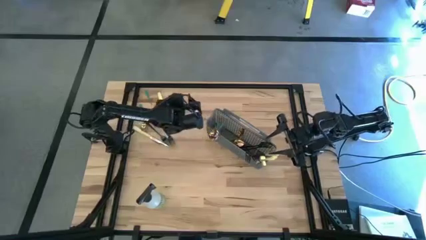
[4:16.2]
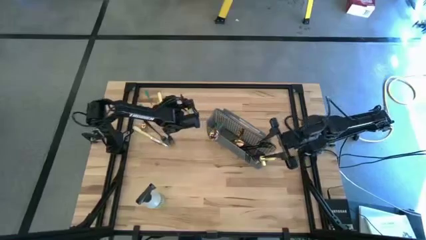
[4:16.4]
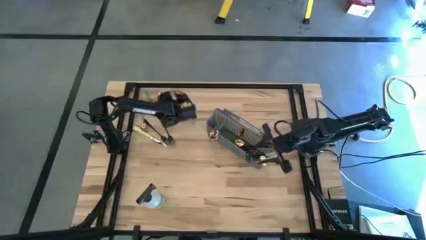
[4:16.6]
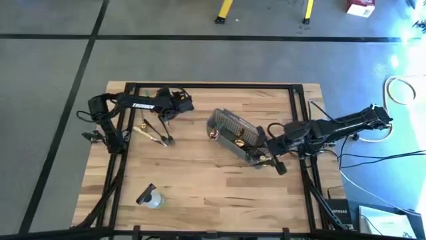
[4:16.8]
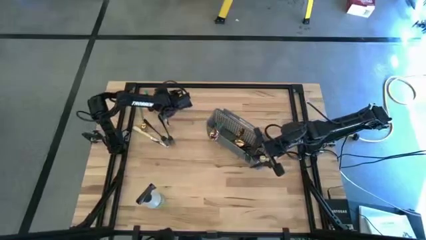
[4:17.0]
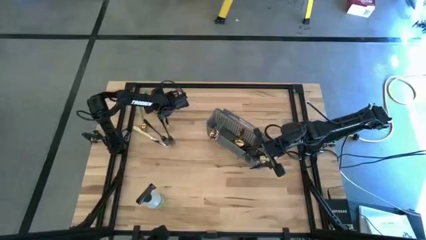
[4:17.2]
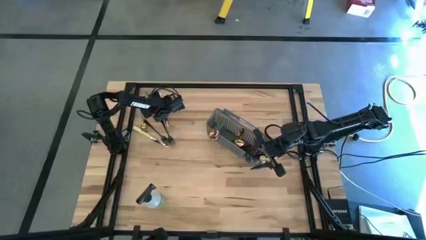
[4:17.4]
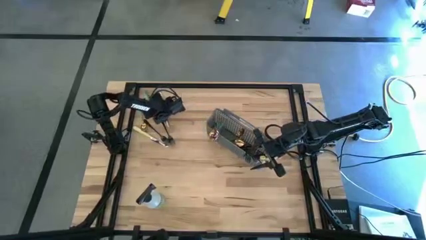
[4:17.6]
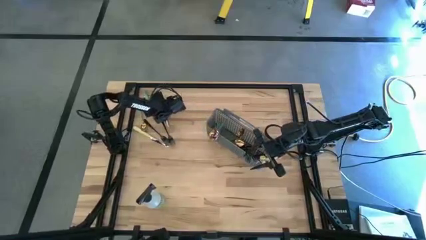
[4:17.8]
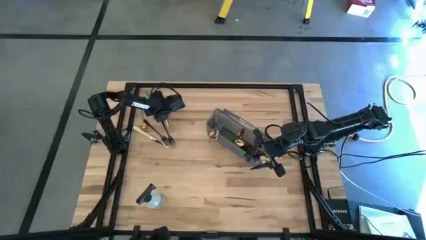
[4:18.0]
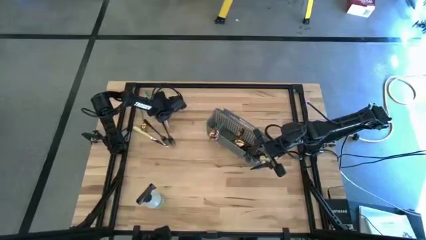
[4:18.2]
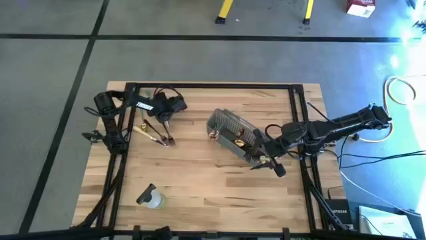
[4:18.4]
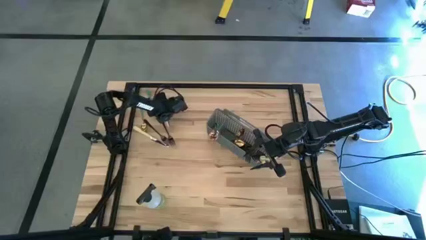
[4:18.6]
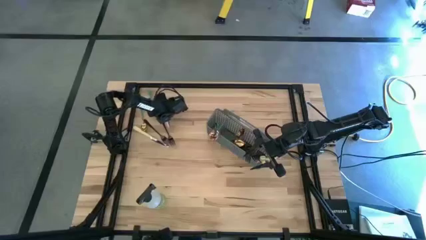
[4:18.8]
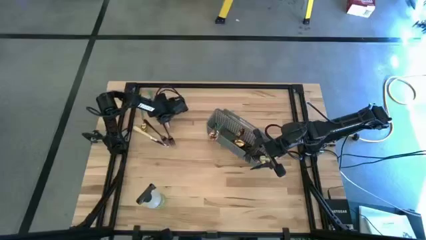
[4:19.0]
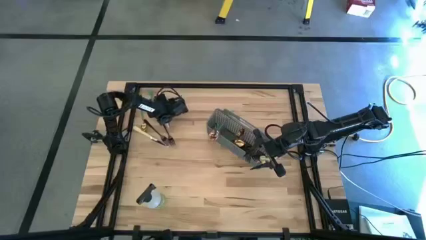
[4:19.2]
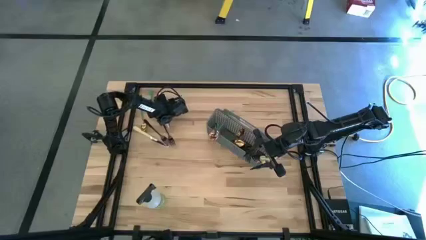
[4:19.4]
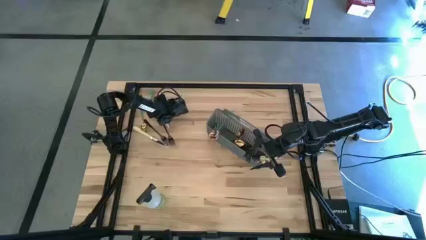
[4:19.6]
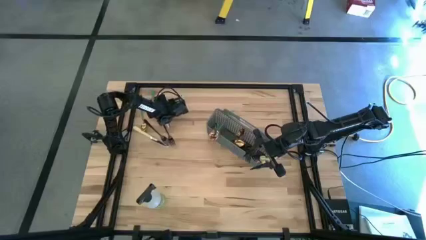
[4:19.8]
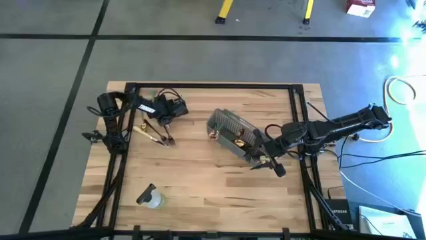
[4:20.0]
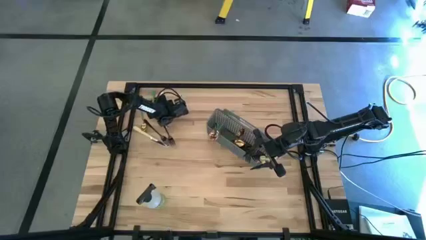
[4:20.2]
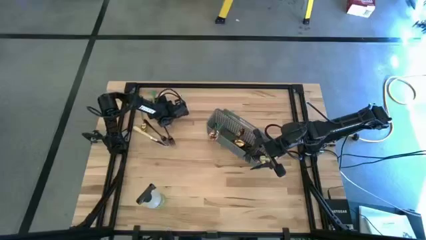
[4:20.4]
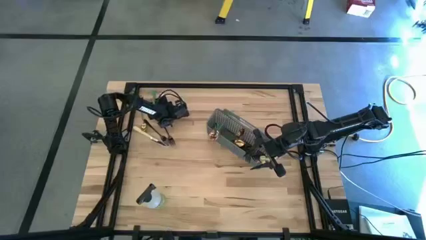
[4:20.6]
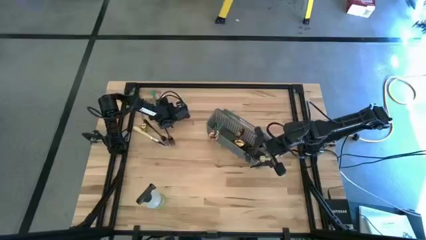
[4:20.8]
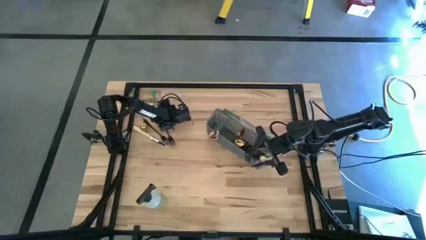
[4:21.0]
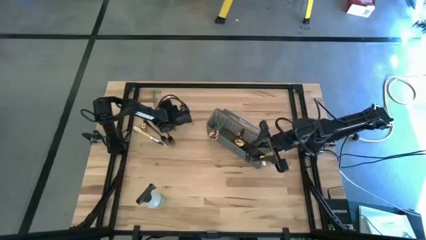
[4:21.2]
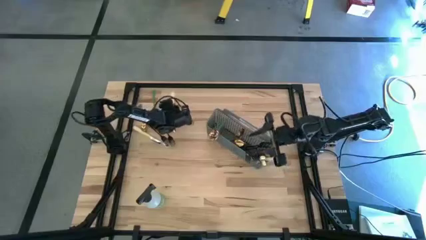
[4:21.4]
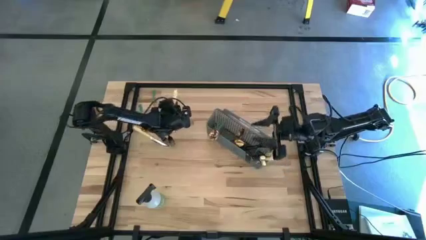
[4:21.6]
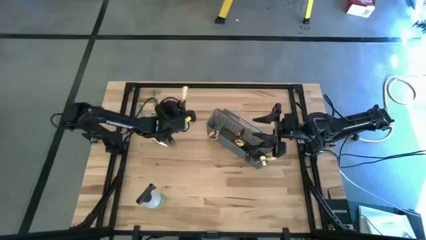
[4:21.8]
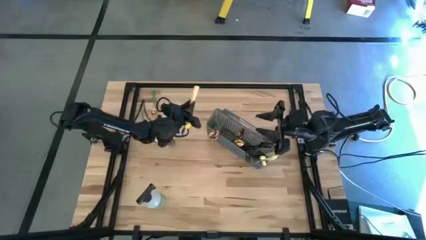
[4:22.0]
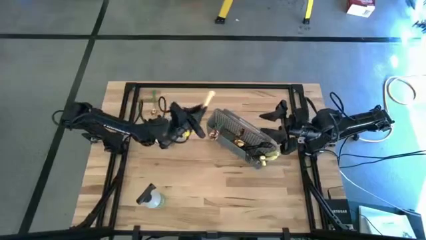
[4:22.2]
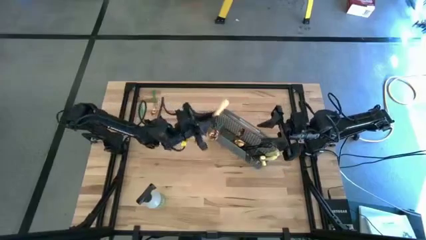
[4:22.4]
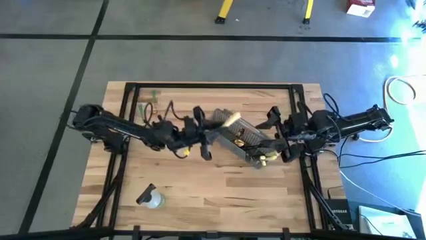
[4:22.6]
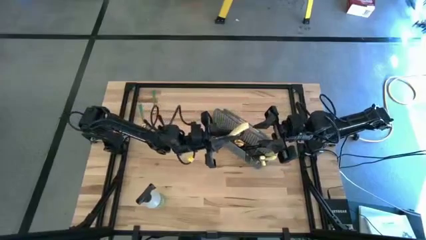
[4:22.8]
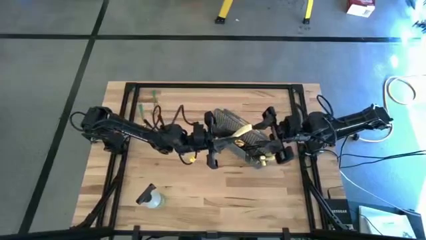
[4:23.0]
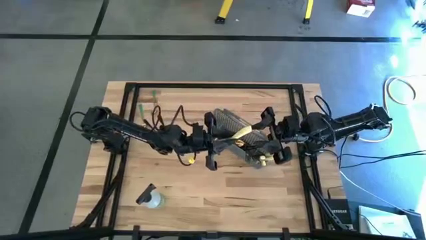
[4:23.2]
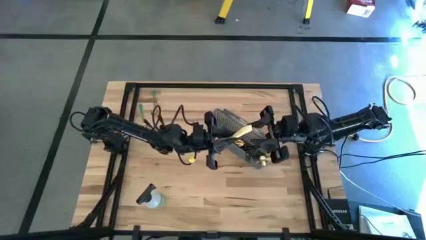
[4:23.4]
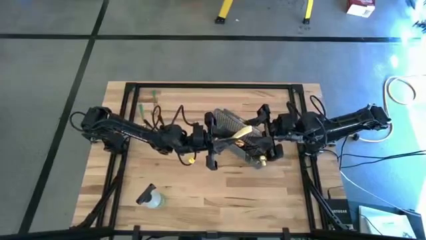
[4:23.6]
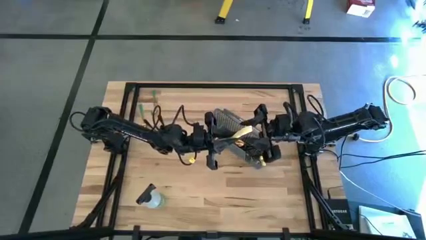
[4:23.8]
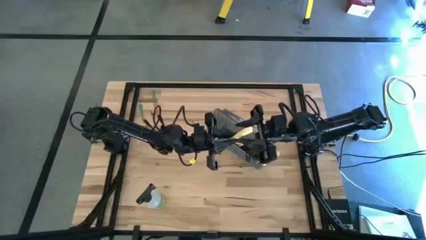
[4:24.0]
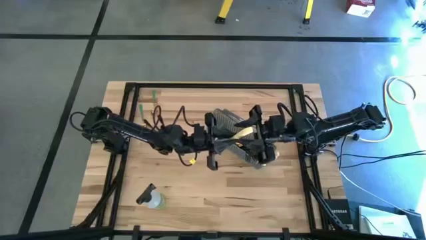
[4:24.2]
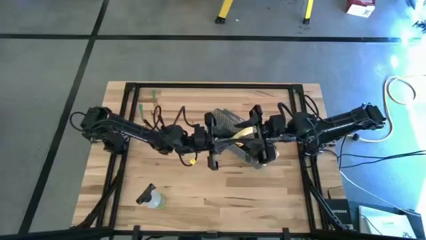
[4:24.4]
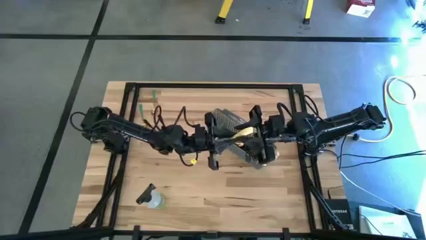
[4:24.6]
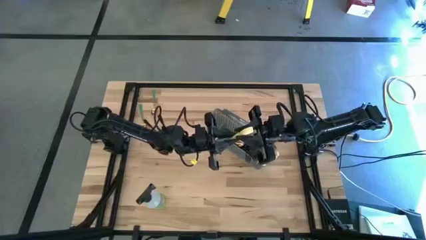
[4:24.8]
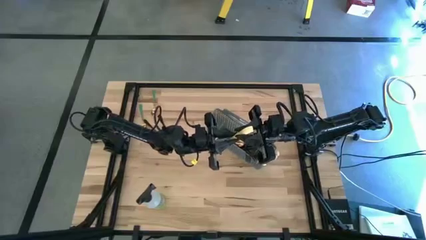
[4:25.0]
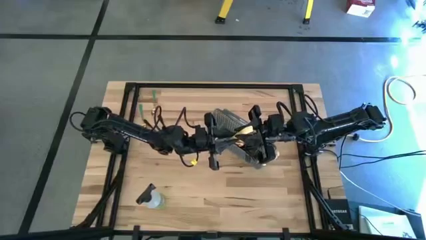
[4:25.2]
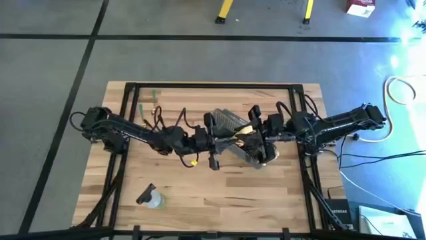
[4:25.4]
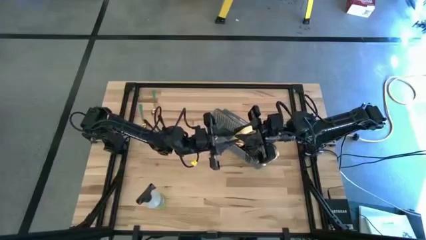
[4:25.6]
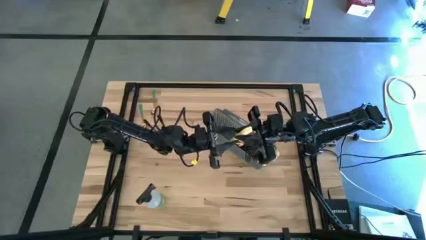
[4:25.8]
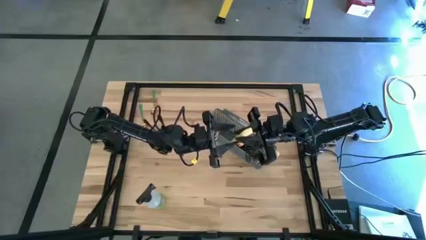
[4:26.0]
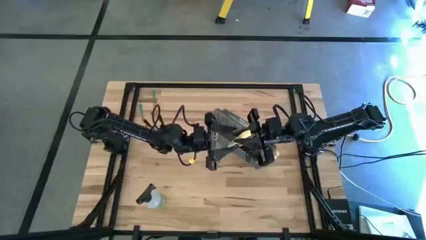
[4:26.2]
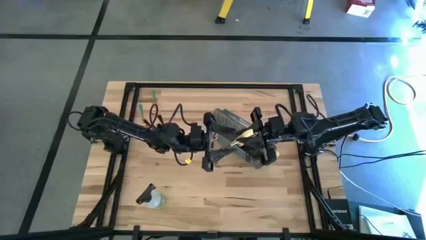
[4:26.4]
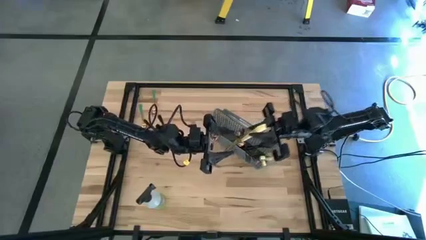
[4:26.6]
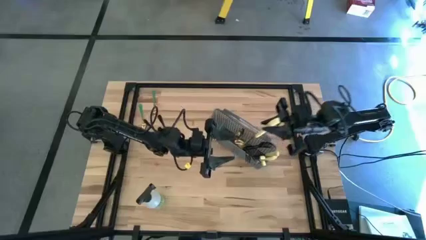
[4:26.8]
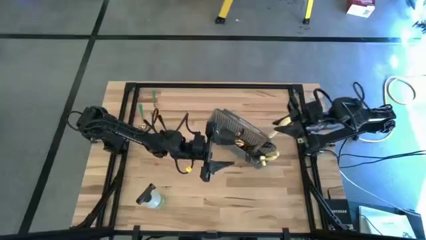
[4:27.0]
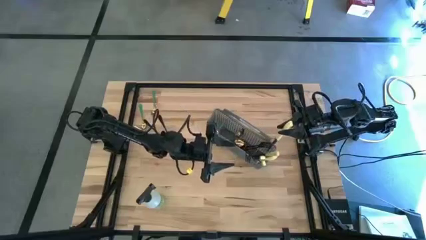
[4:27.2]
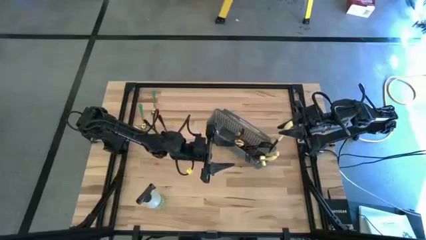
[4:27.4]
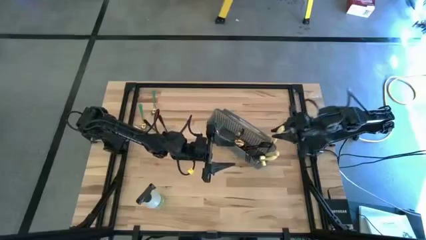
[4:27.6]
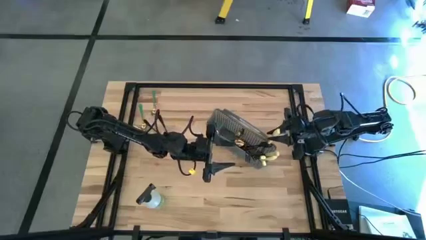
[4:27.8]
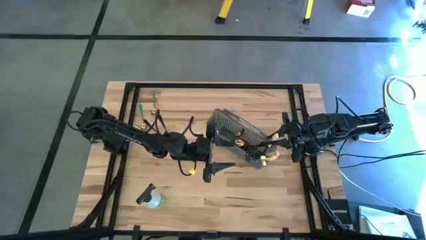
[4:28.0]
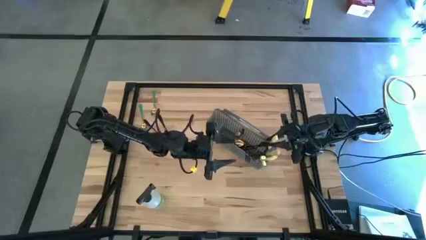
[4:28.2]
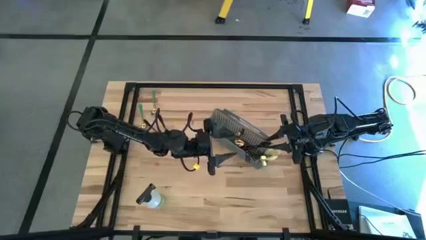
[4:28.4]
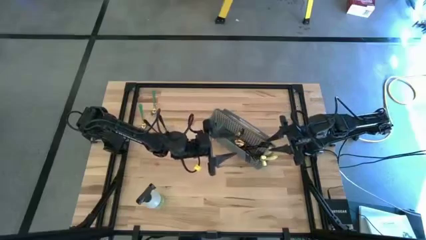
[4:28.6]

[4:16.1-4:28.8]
Task: Sort silverware
Put the silver knife into the cutlery rack

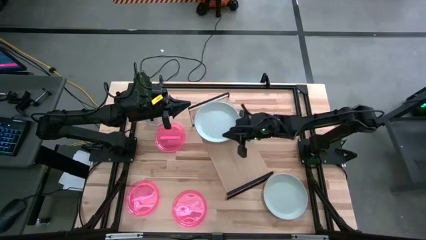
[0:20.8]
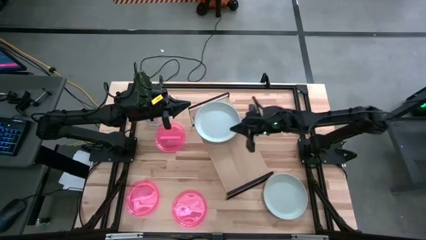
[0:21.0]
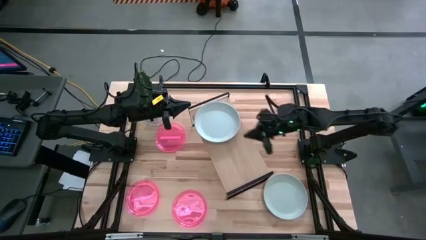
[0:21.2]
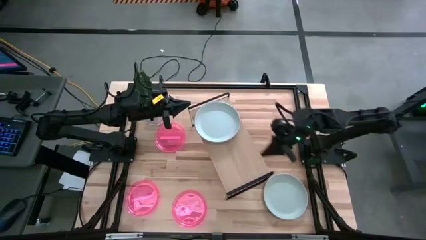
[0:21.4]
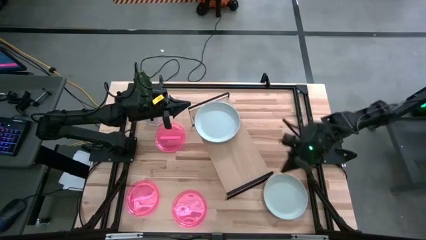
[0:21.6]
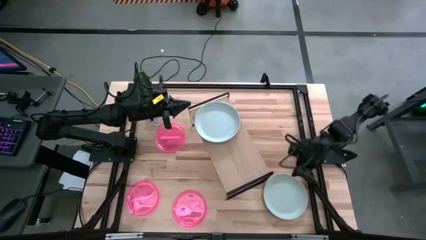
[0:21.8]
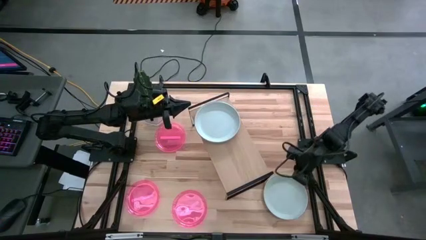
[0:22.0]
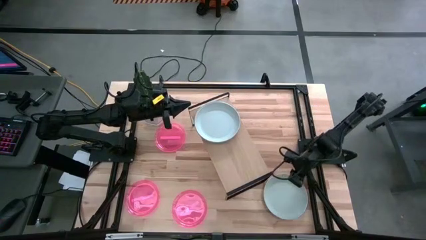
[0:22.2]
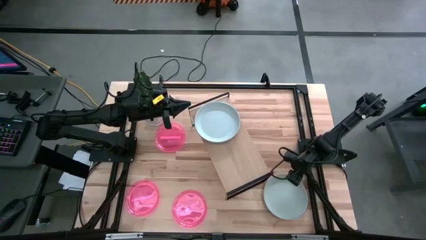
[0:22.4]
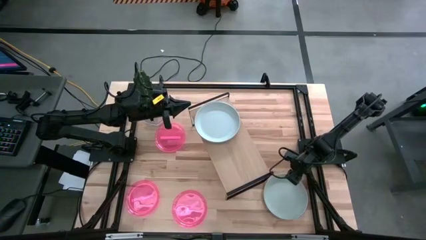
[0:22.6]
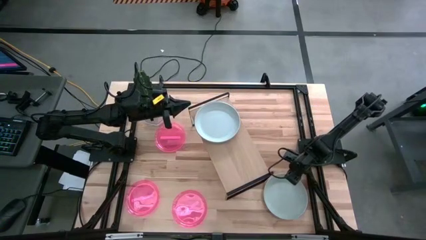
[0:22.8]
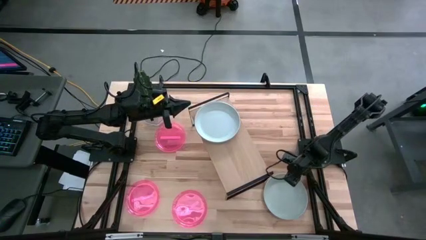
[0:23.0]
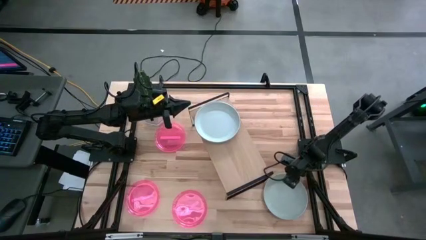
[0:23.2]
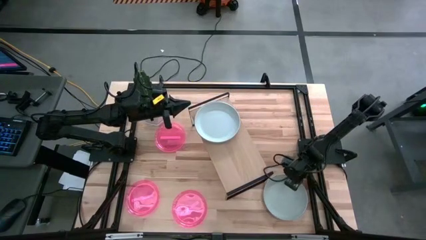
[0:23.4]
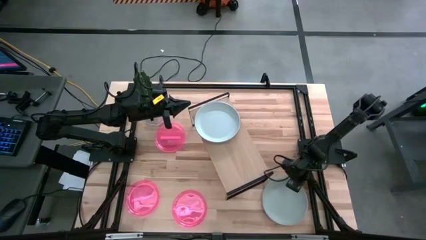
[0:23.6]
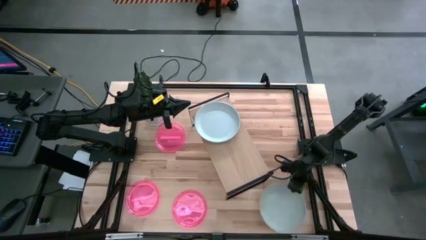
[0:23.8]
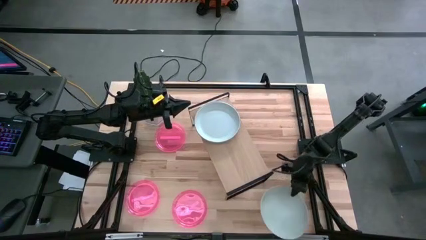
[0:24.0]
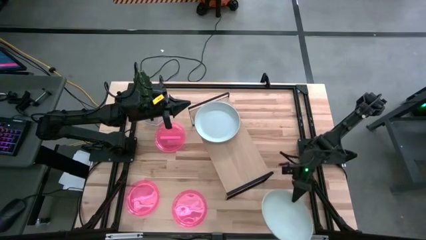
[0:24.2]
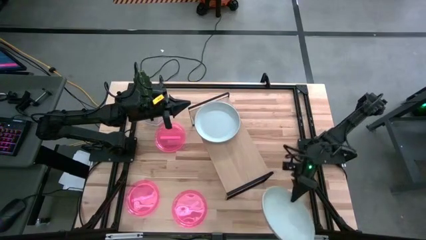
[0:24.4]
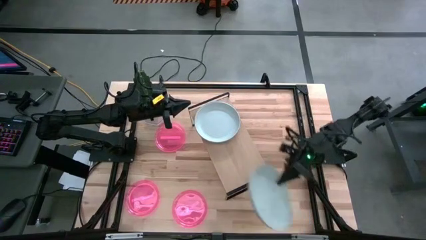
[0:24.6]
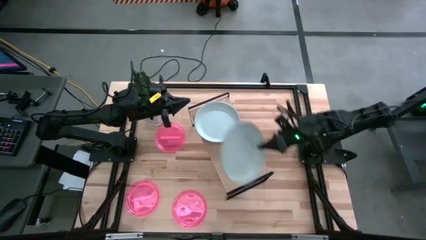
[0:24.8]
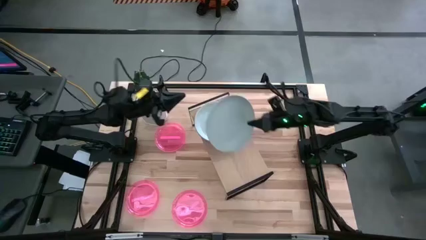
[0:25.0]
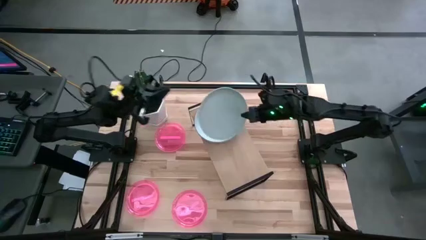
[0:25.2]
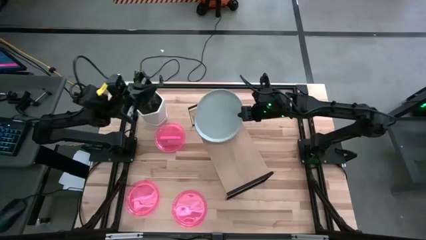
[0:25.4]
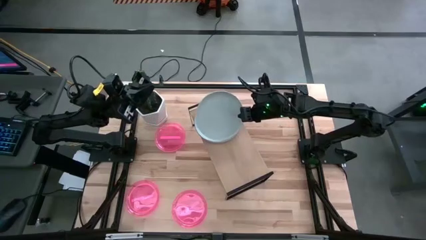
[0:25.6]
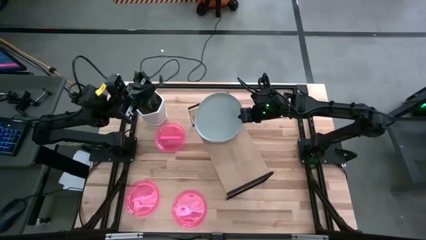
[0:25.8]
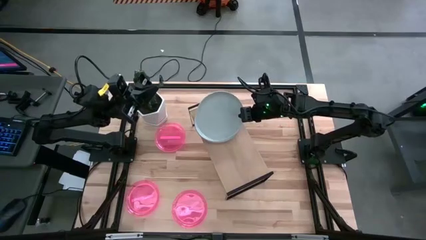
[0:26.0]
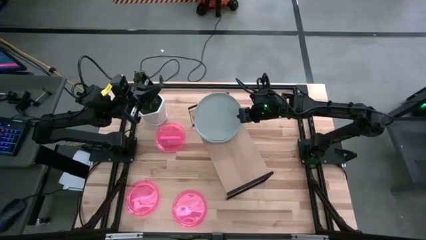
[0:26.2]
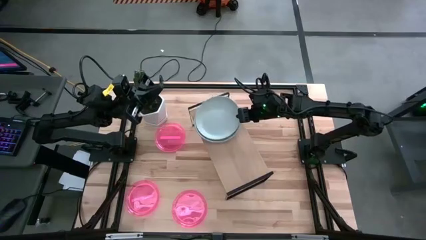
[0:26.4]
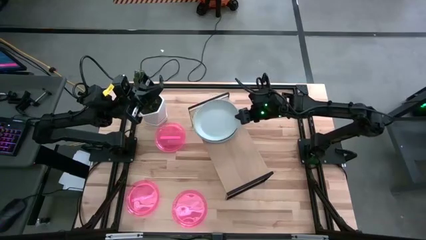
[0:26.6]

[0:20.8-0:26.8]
Task: Place and stack plates onto a shelf
Stack the gray plate on top of the gray plate on the shelf
